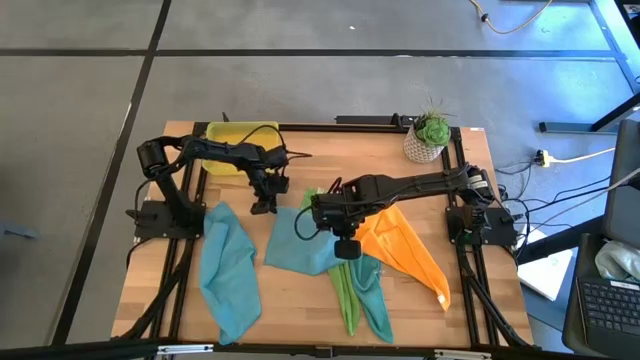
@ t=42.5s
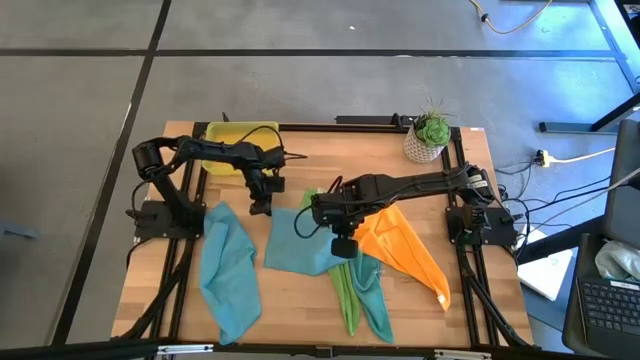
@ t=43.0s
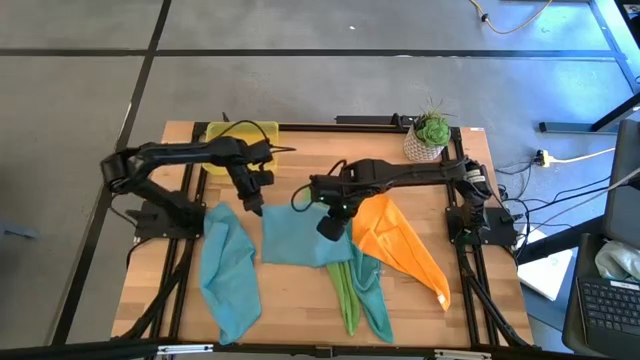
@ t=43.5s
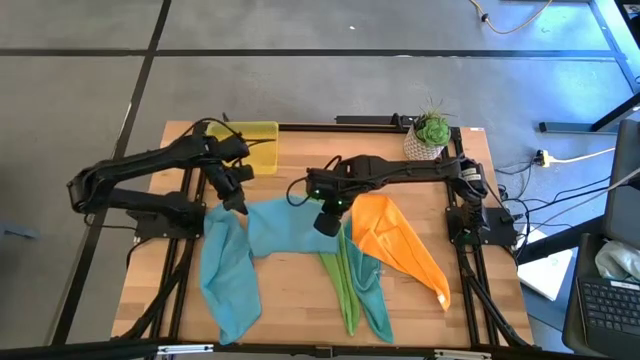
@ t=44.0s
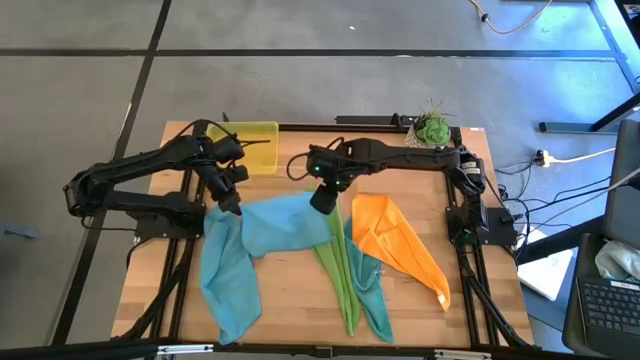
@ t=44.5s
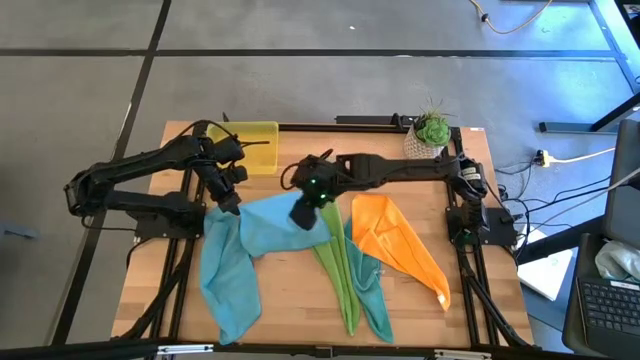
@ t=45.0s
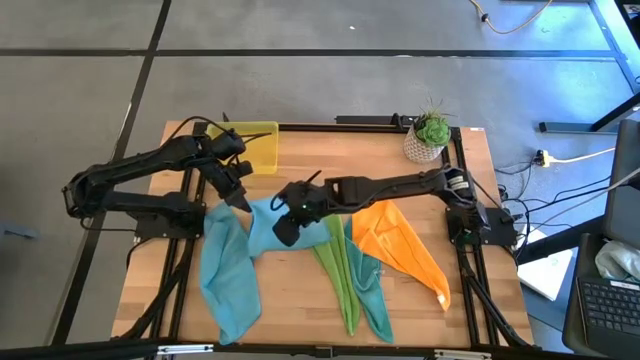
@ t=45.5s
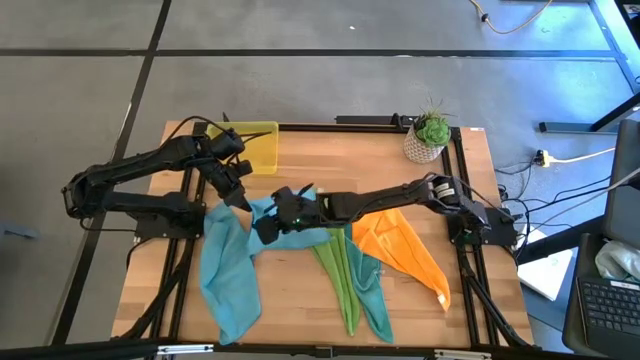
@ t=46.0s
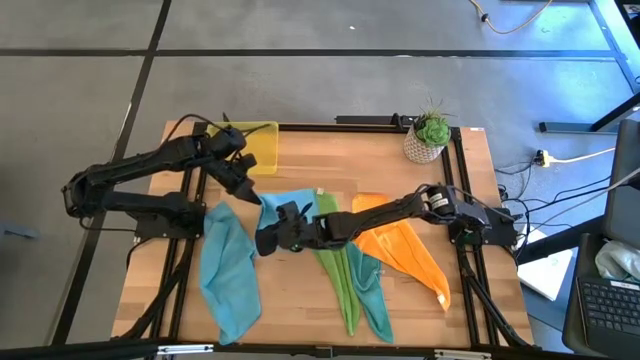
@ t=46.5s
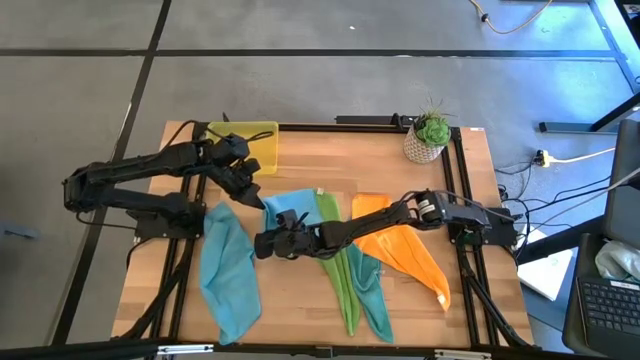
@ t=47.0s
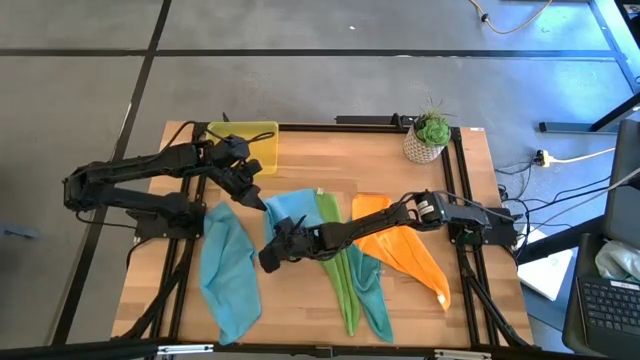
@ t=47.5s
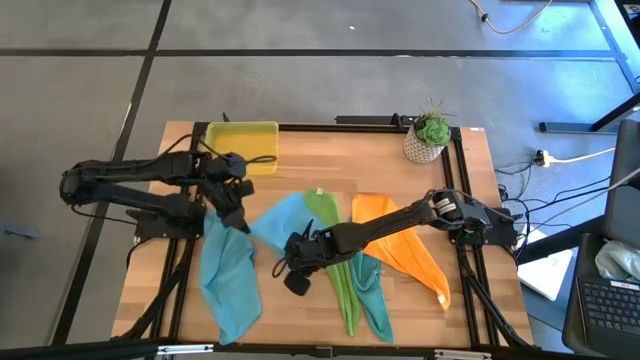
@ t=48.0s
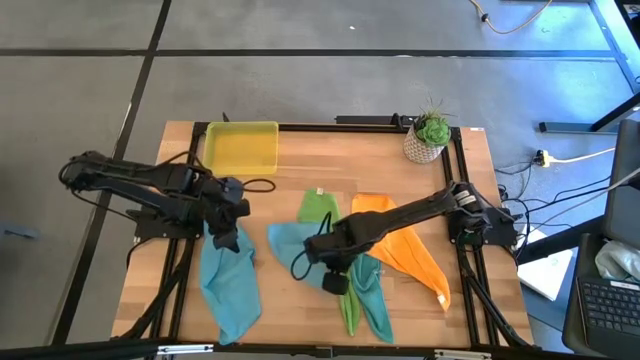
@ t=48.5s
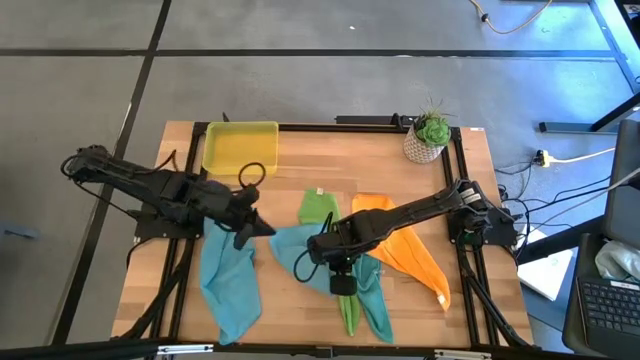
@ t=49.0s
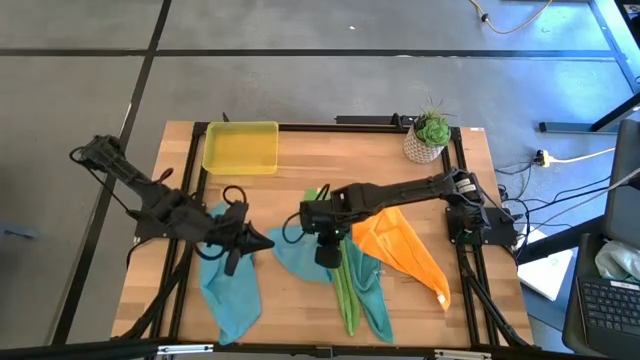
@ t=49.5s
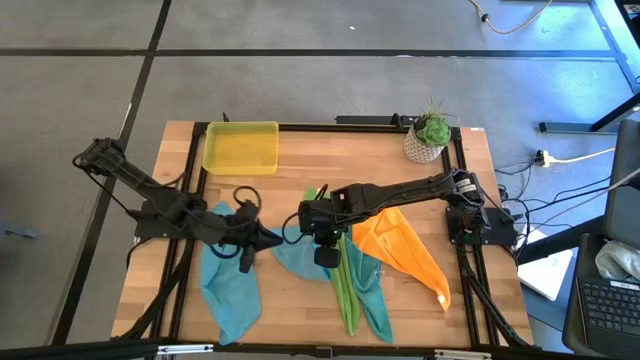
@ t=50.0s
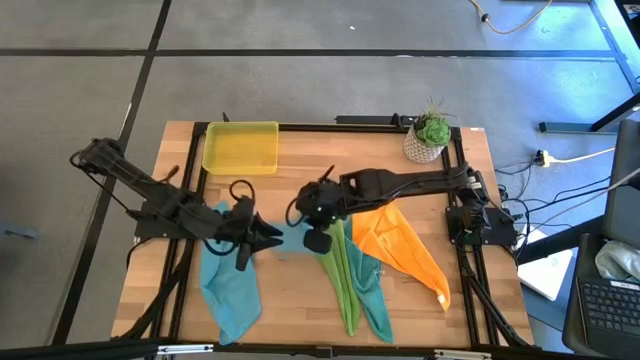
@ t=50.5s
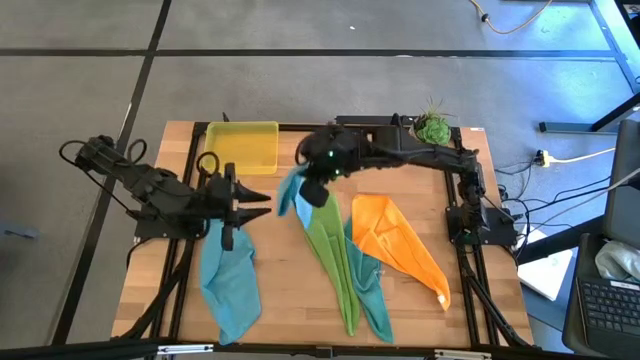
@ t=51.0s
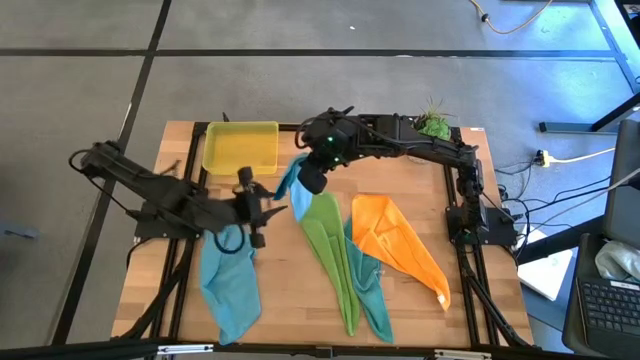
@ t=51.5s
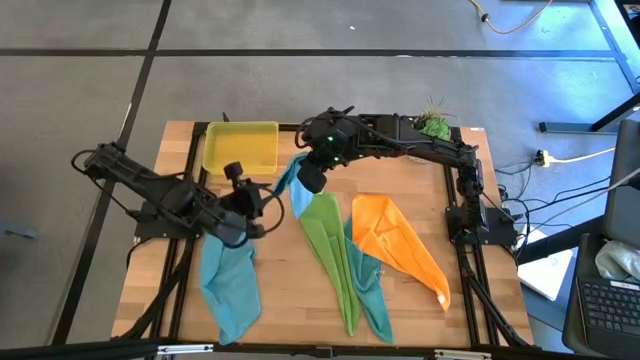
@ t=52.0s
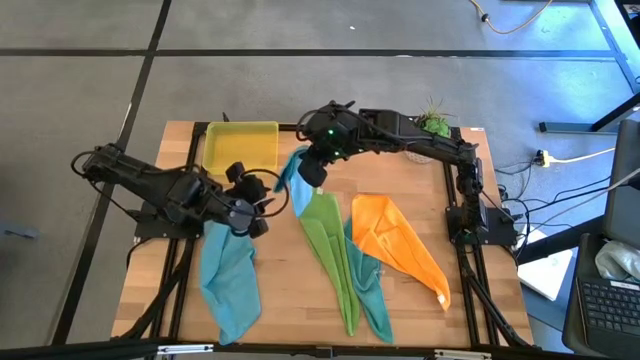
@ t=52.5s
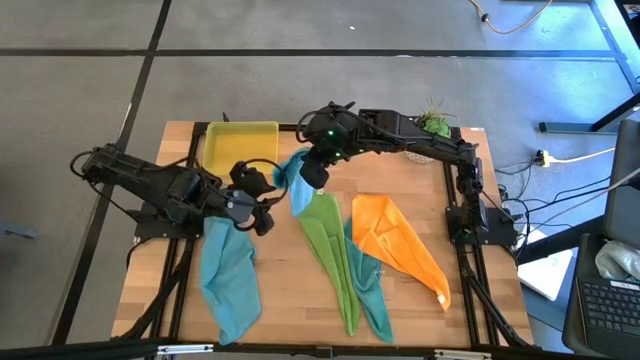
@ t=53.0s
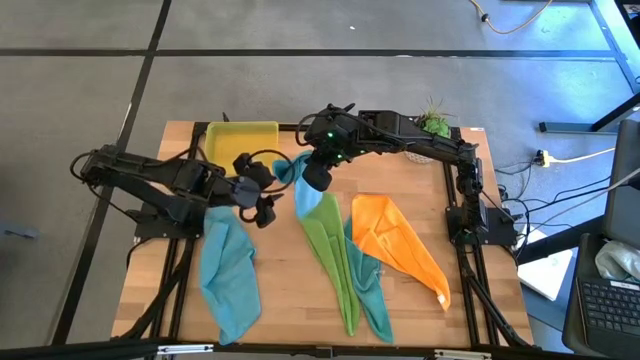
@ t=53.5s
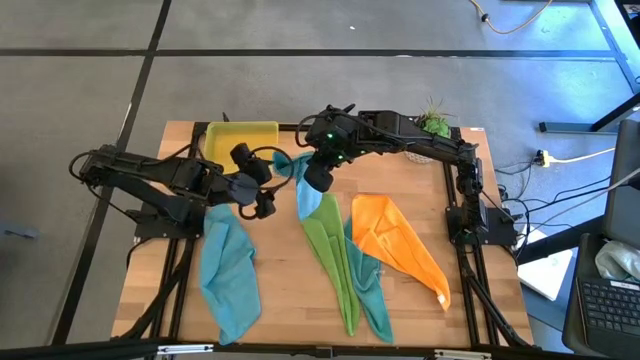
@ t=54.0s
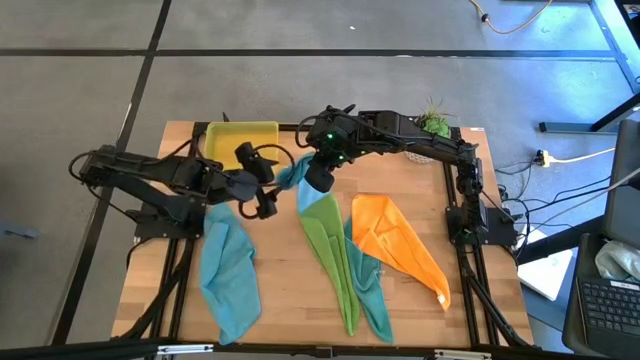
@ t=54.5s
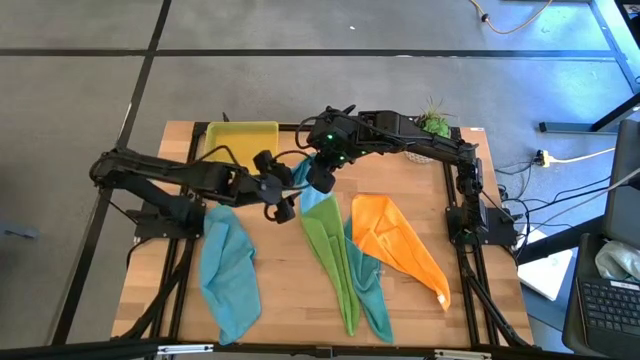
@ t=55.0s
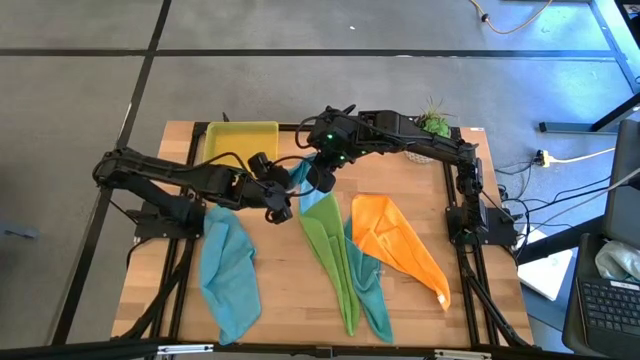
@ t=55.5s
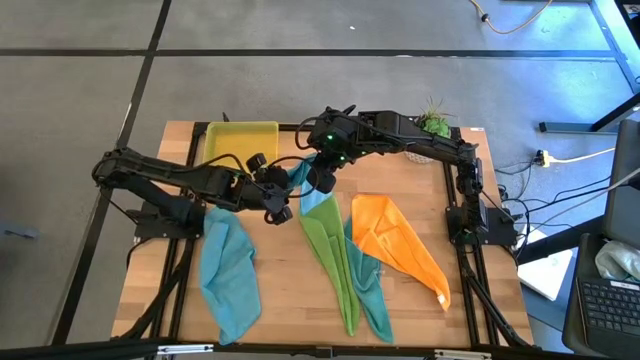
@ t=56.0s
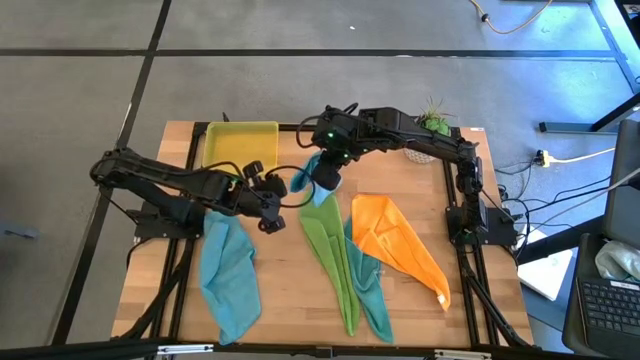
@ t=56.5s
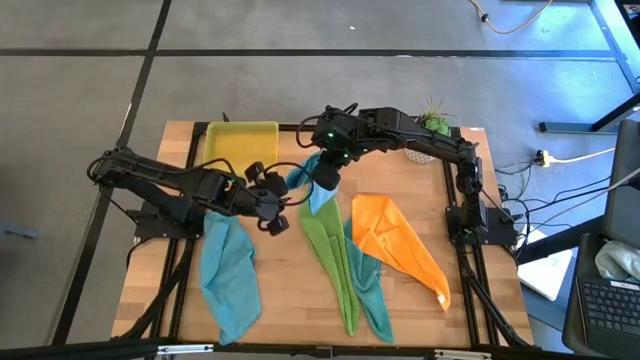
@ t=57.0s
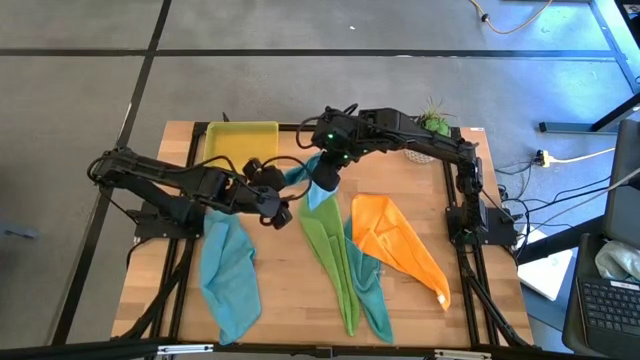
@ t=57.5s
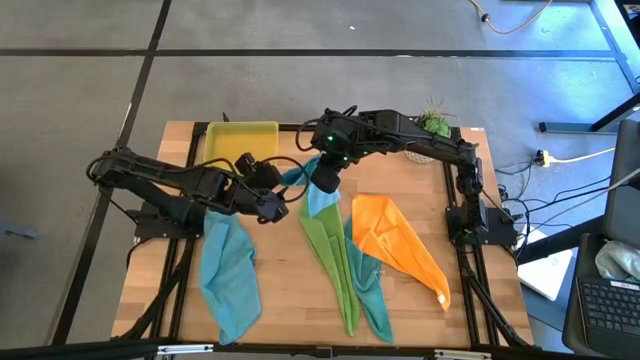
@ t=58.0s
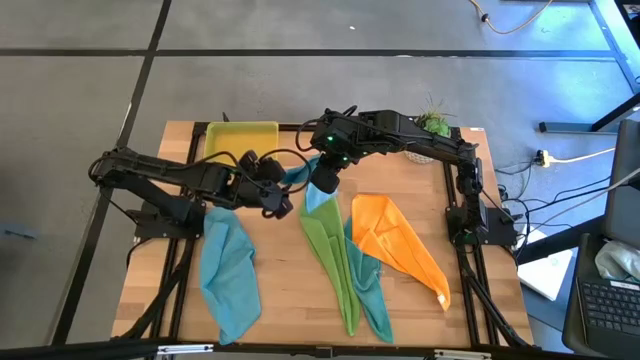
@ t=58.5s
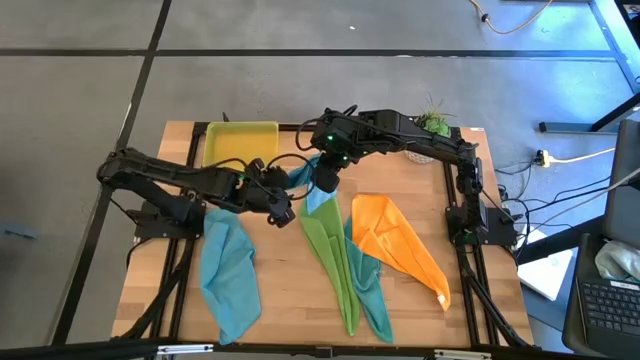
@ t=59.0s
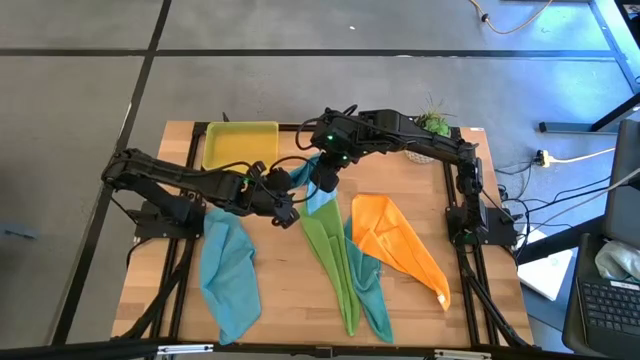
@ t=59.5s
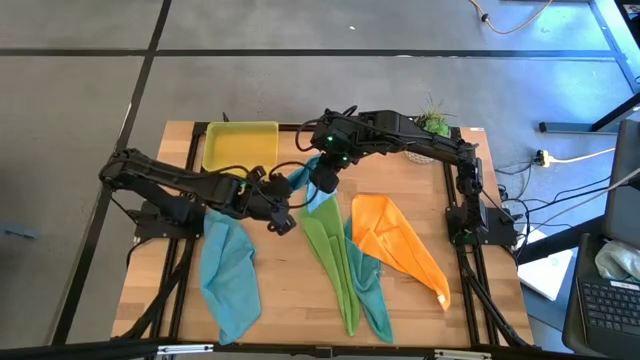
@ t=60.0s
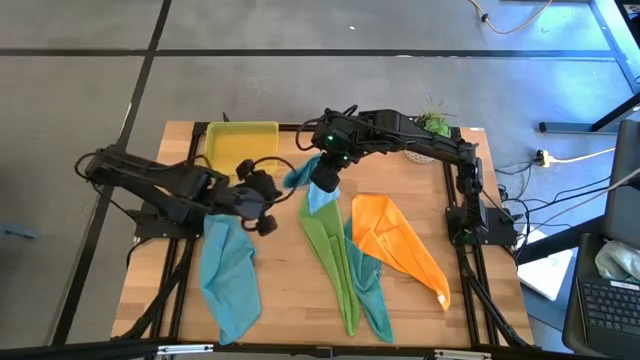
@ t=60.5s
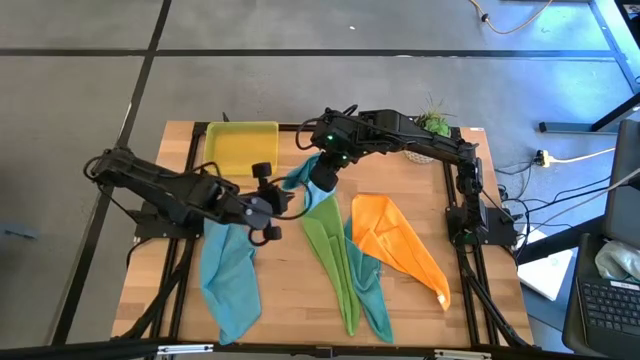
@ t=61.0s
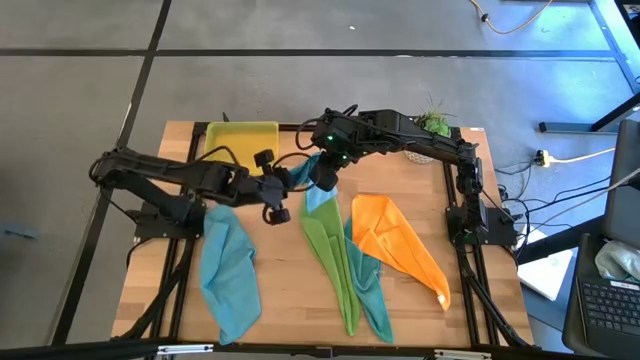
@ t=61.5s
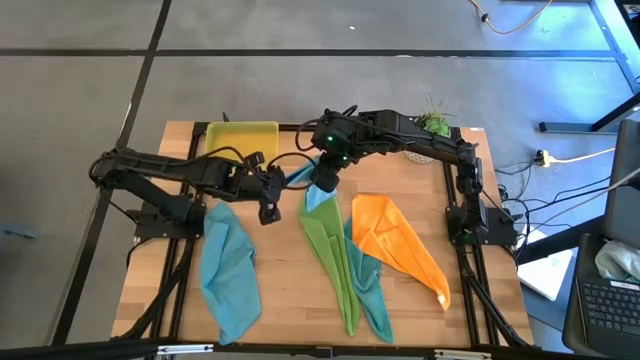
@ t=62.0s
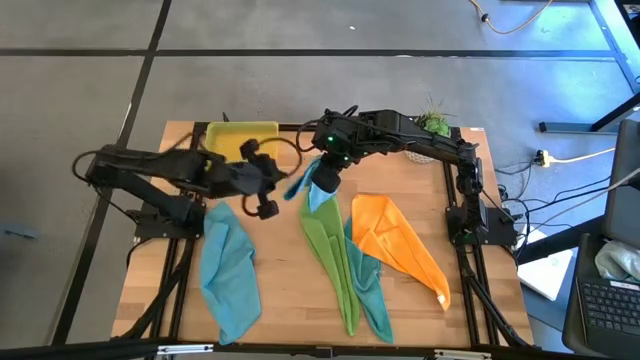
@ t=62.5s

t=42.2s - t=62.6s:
Task: Fold microfiber towels
Fold the center blue towel
